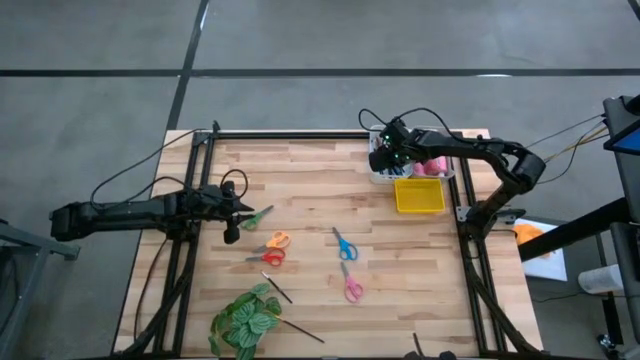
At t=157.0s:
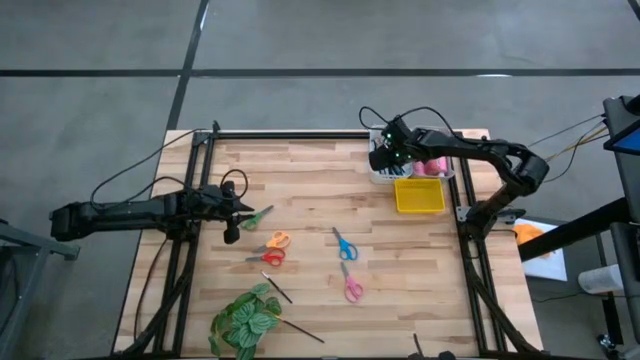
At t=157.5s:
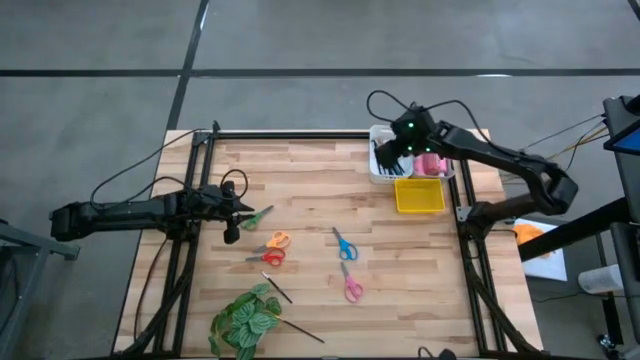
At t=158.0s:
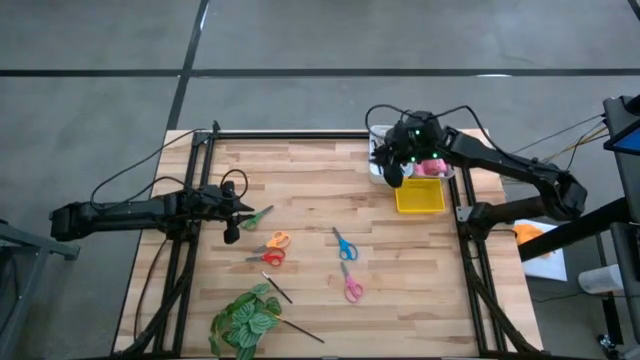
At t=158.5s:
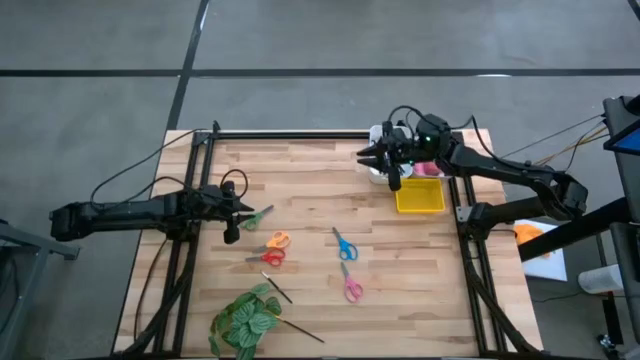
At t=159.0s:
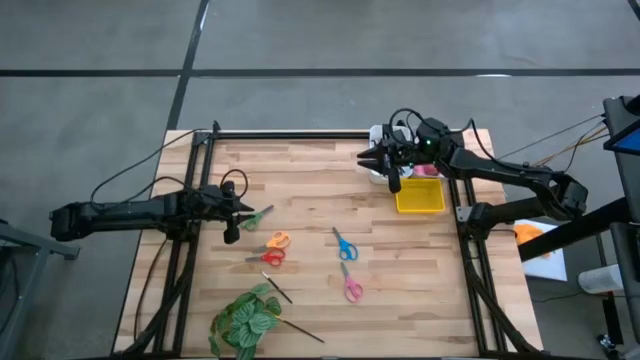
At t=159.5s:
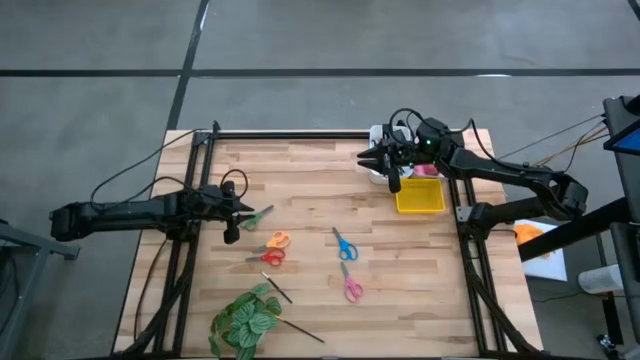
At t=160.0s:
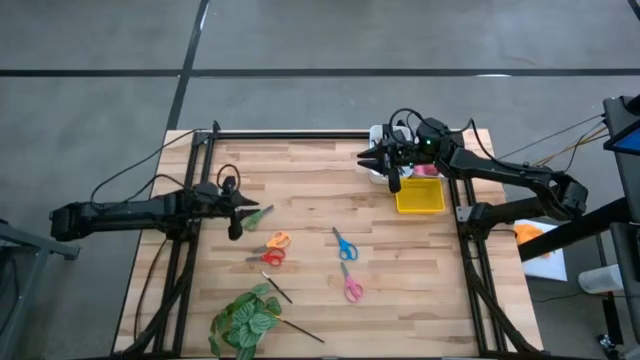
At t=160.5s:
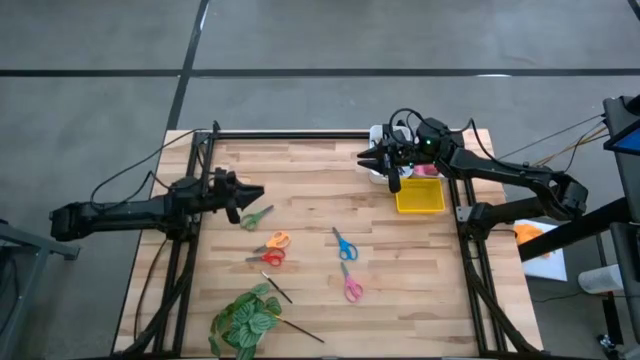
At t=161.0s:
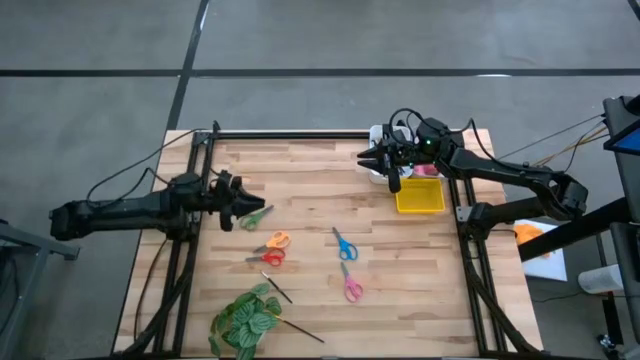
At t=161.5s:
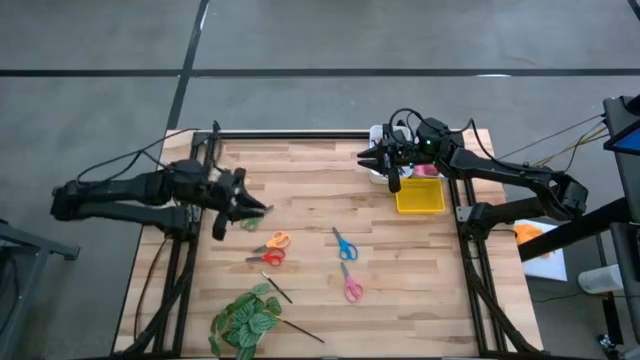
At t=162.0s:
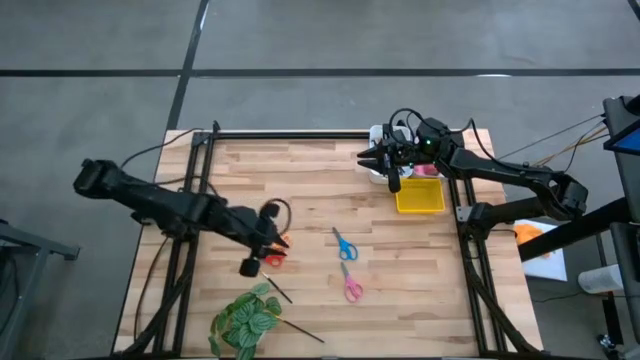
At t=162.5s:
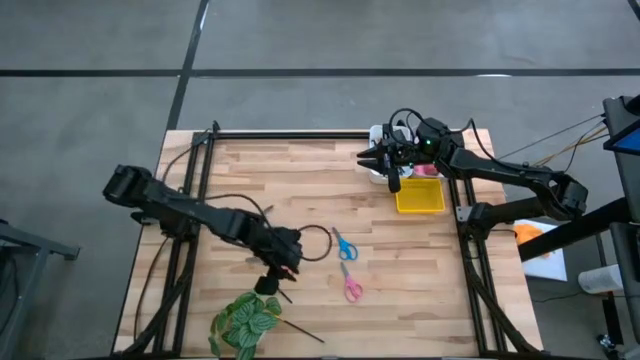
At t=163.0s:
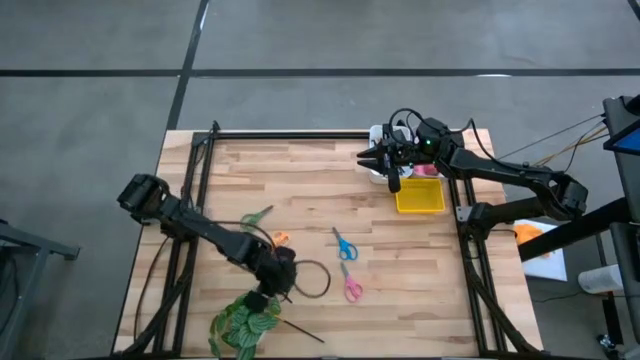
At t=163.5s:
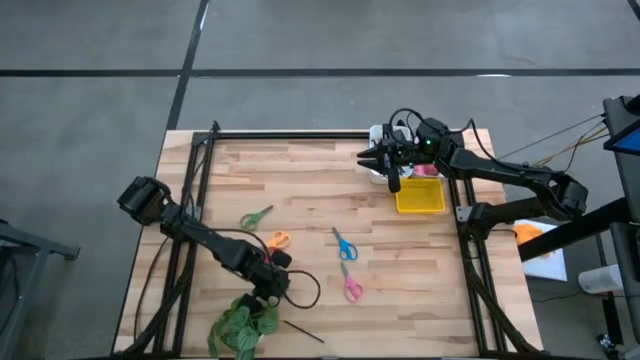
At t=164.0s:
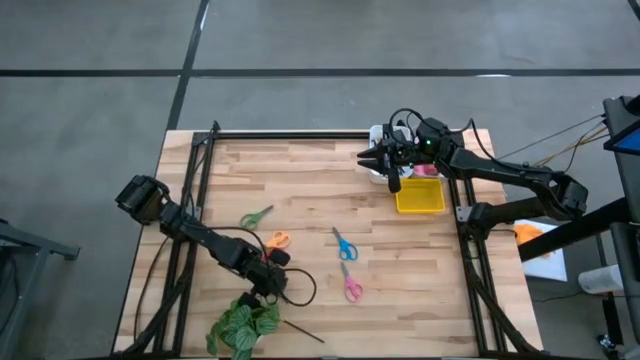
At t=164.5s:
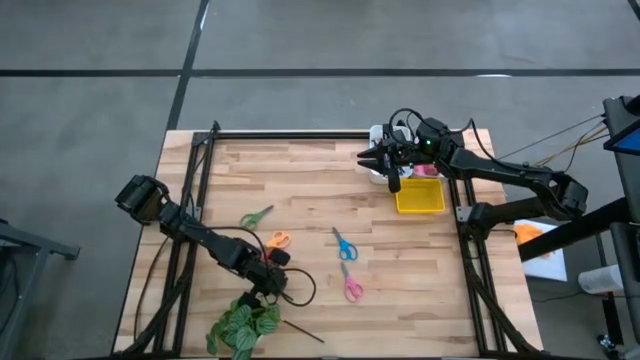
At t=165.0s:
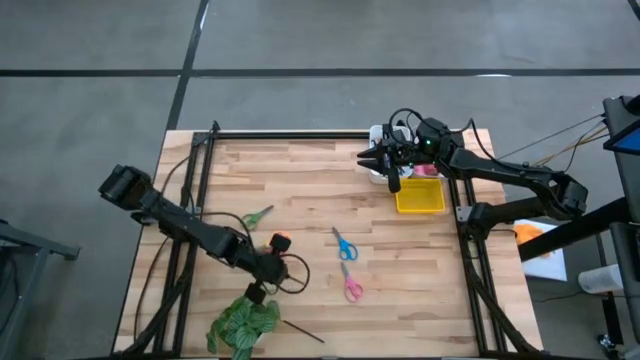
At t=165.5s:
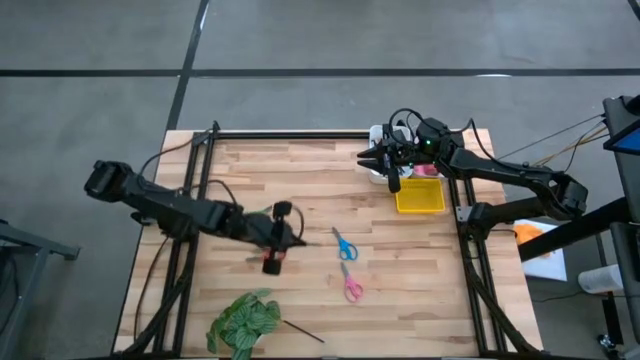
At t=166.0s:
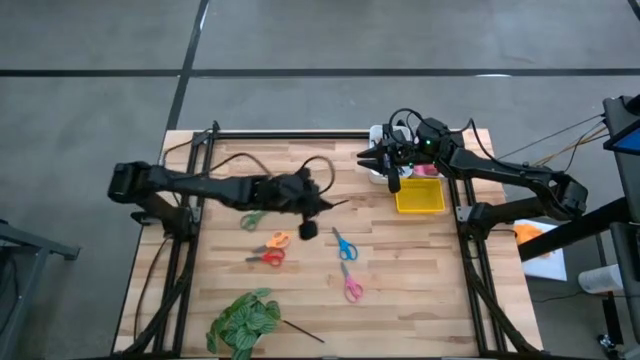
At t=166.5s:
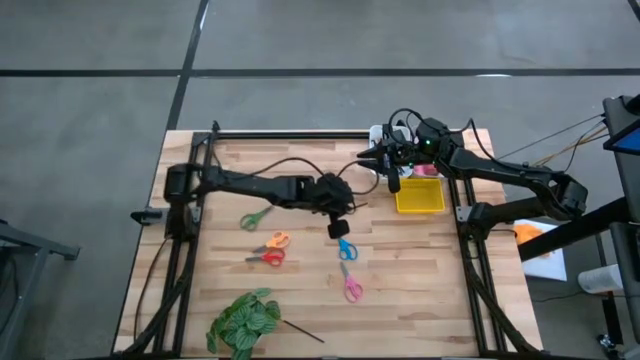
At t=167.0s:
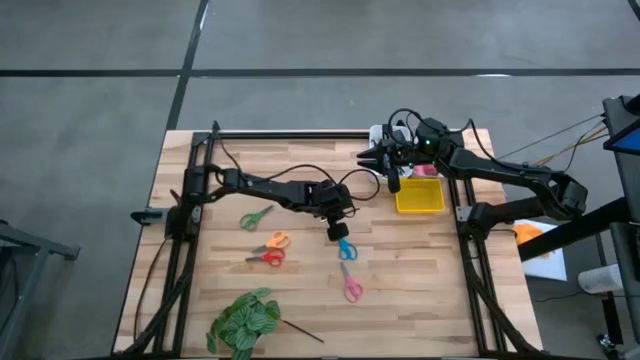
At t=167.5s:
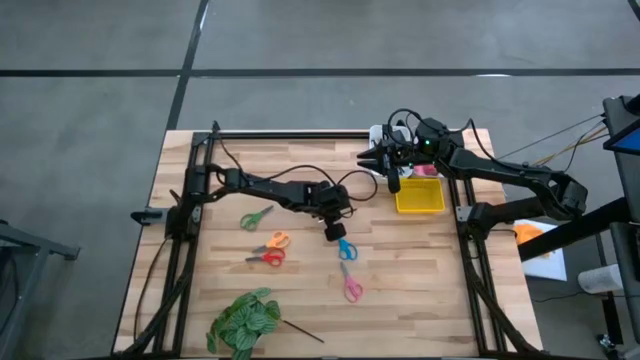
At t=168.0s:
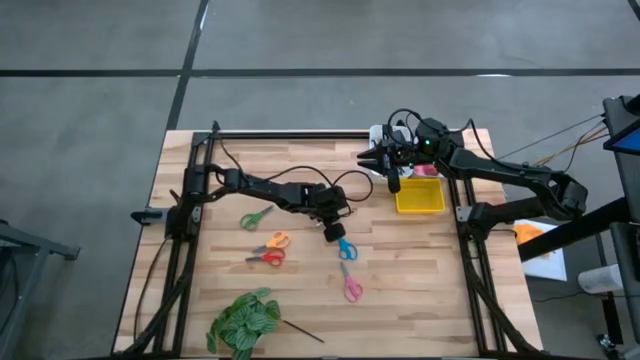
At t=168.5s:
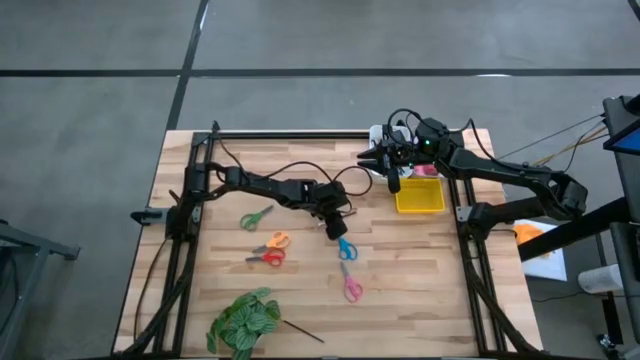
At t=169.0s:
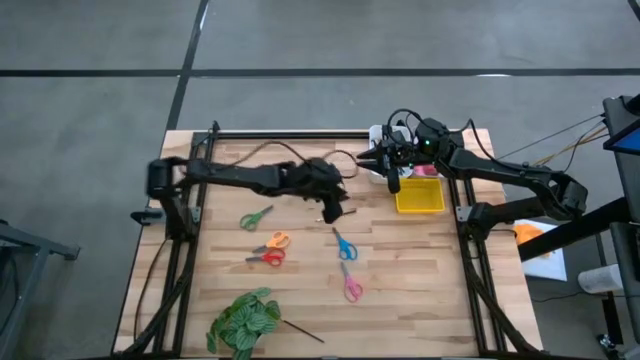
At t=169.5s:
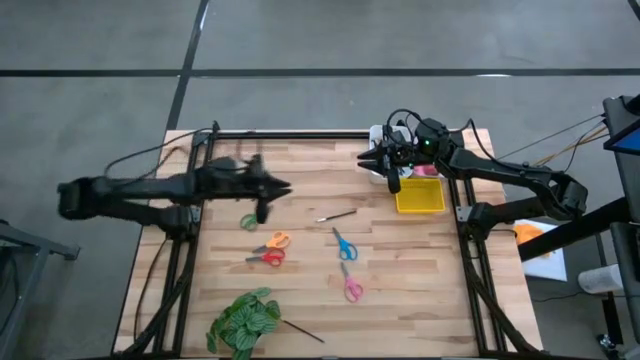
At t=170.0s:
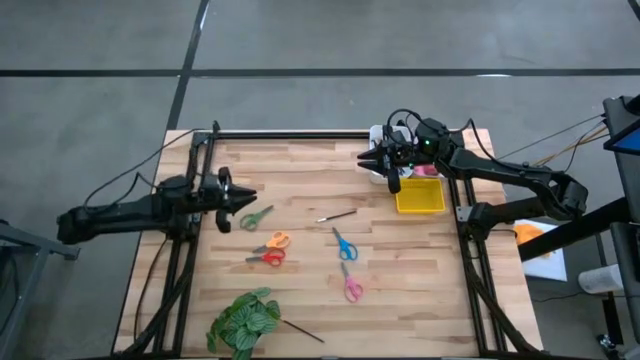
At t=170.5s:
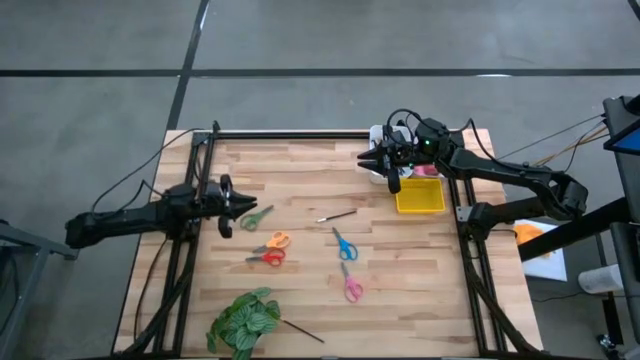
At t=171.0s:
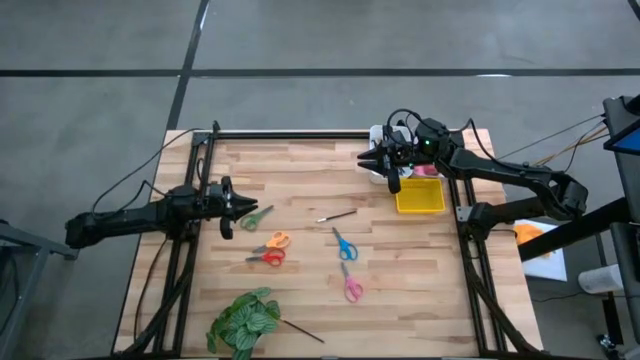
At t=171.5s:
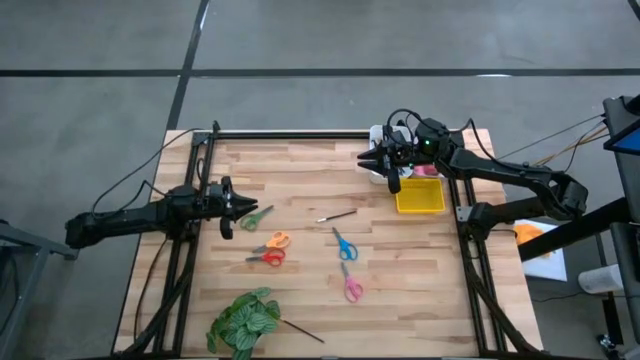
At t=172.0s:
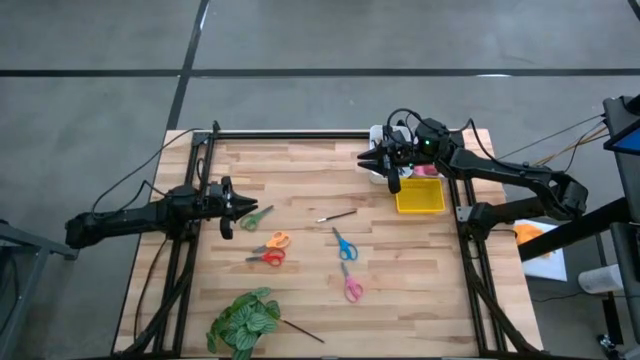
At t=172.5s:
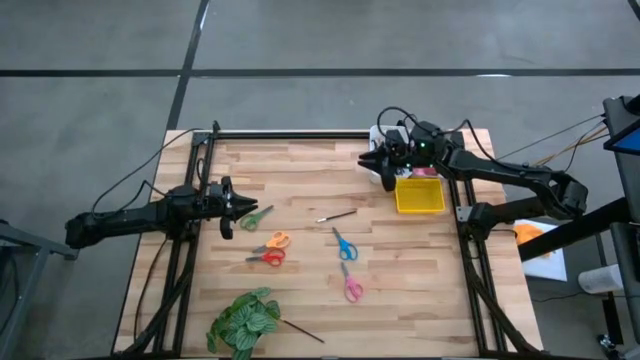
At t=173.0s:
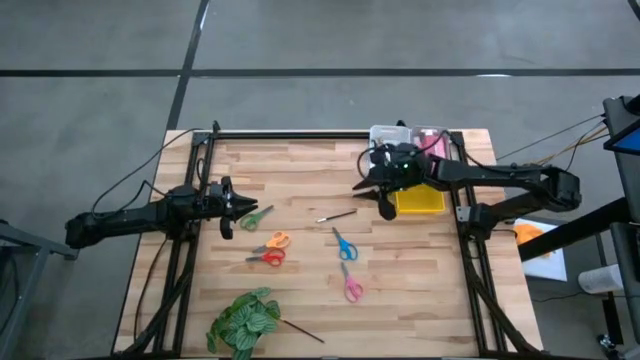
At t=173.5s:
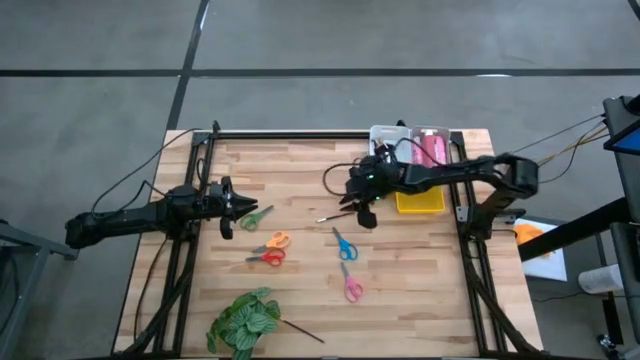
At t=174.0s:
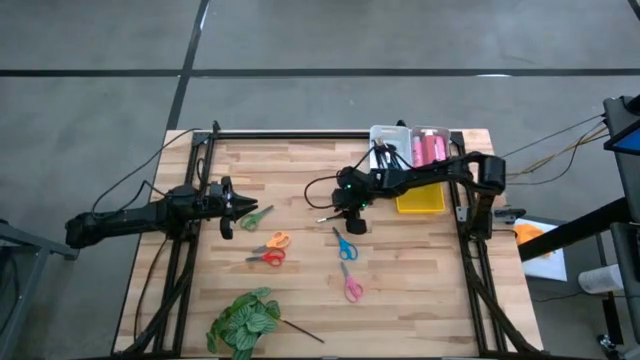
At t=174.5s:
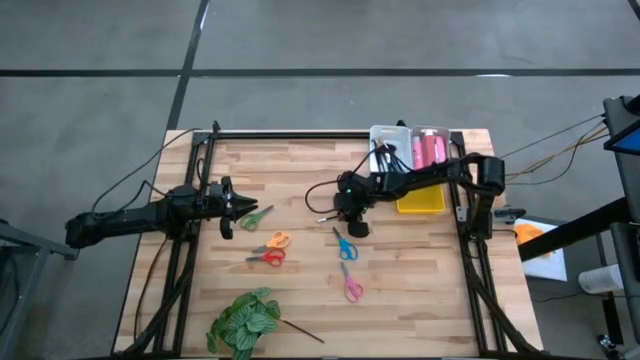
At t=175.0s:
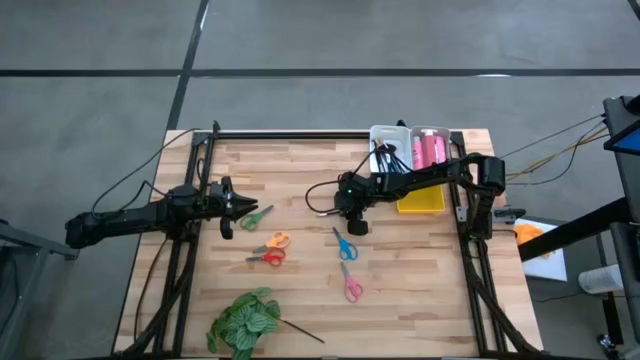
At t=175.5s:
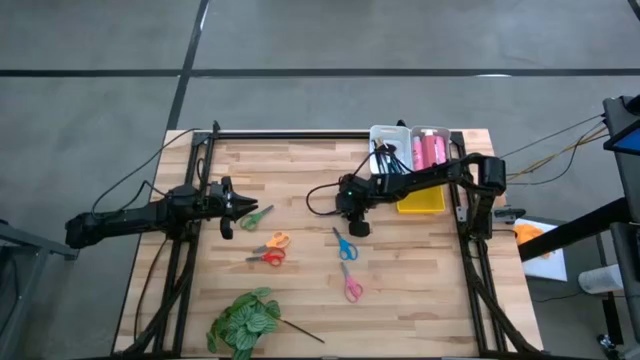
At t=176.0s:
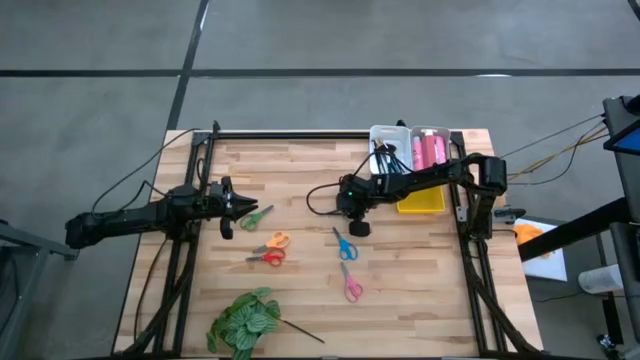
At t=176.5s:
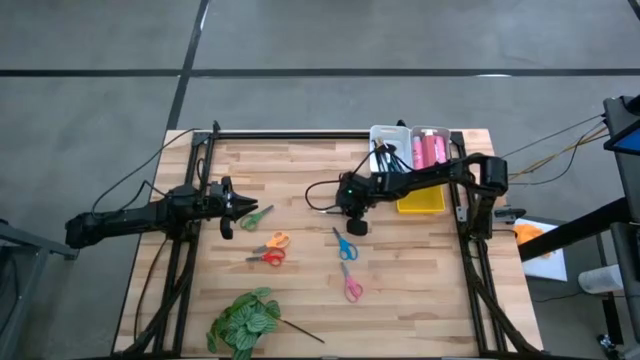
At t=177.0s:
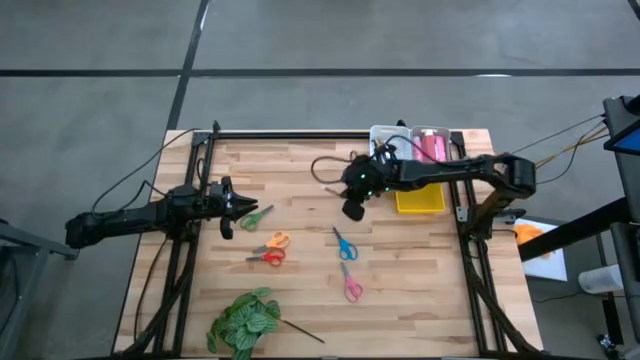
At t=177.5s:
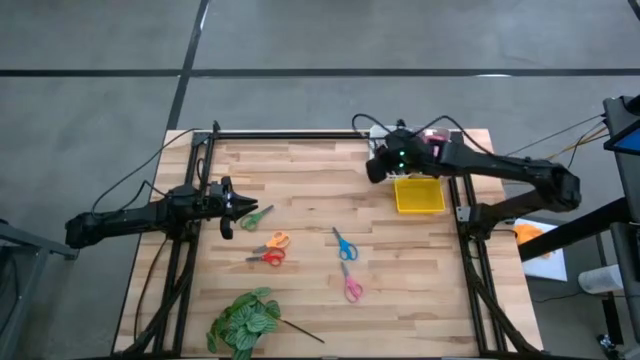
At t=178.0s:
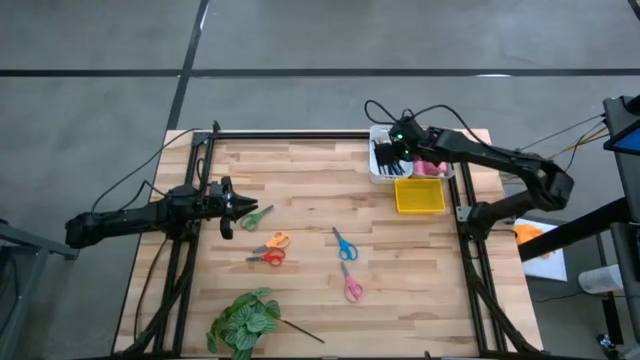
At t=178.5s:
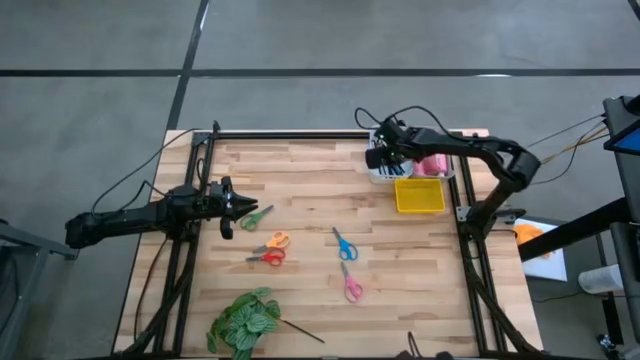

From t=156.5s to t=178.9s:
Task: Pick & Place Paint Supplies
Put the black paint brush into the white bin
